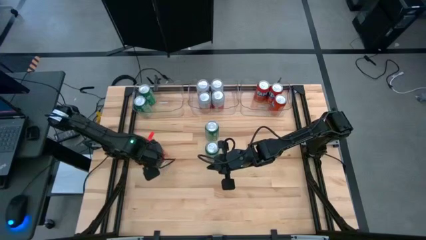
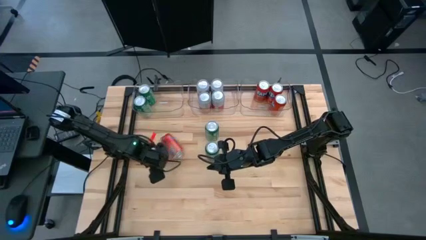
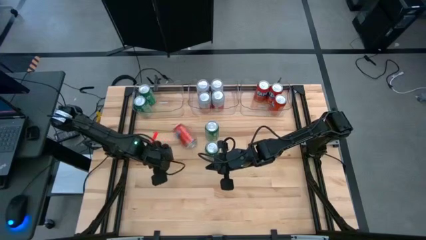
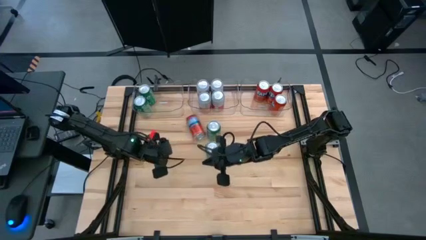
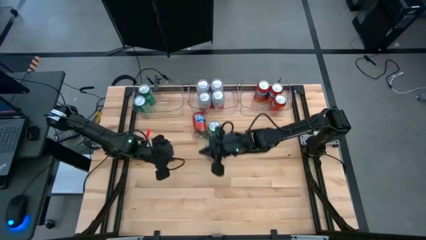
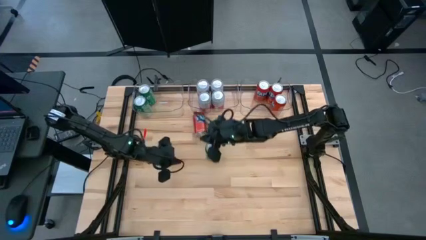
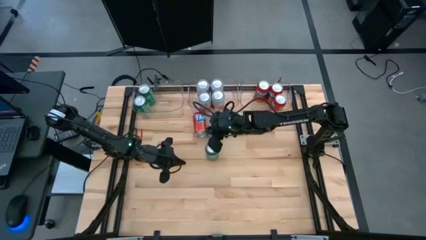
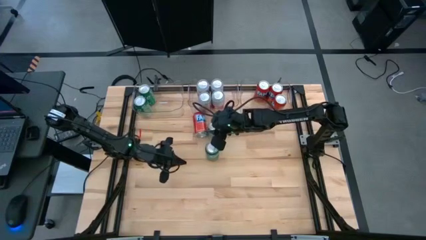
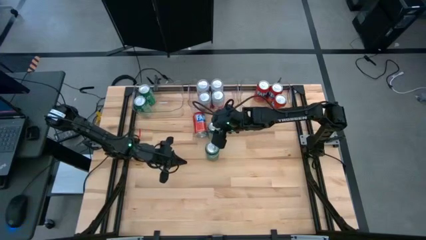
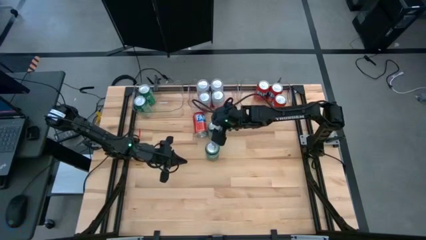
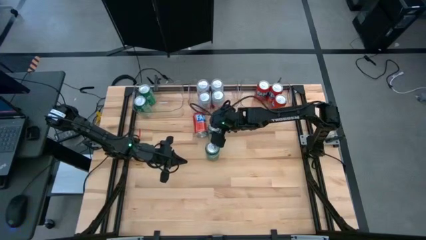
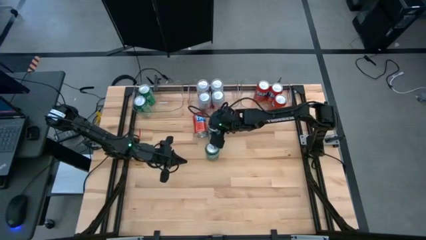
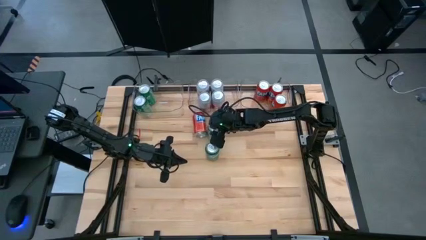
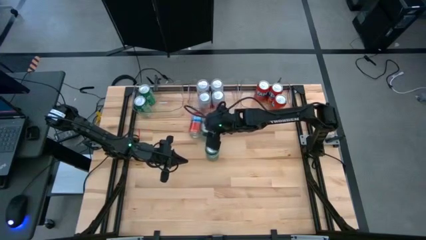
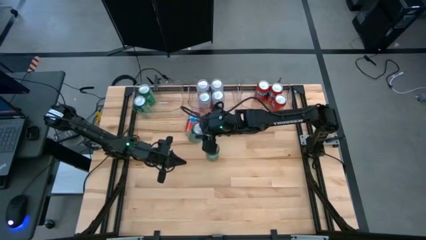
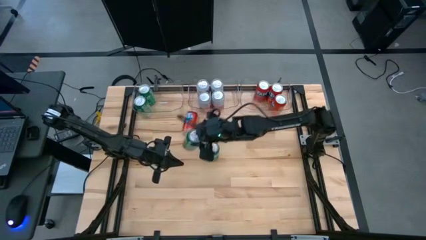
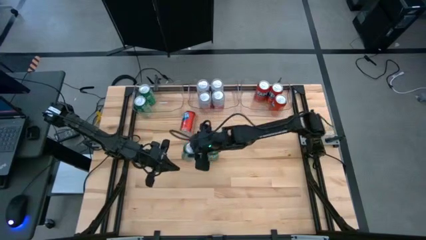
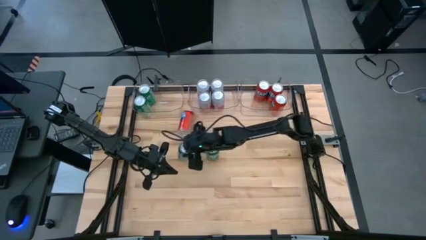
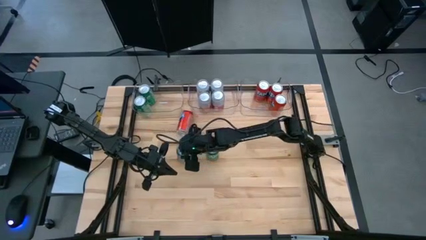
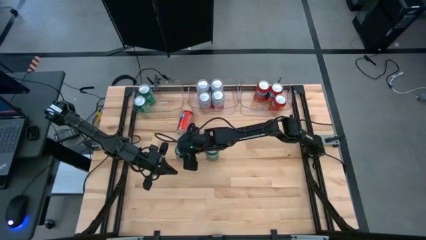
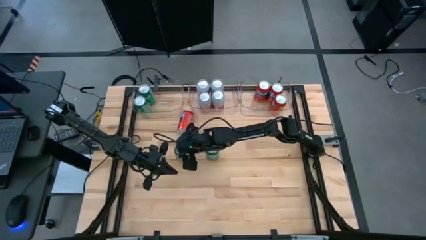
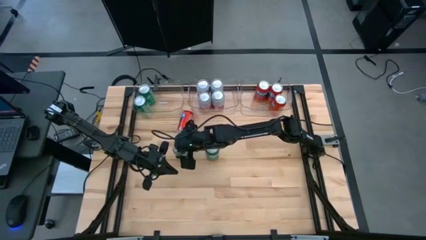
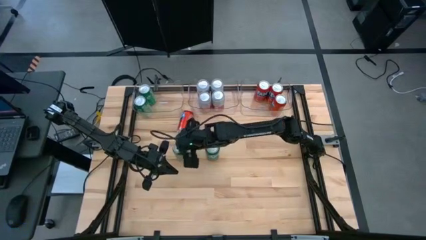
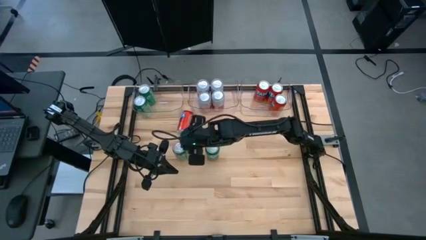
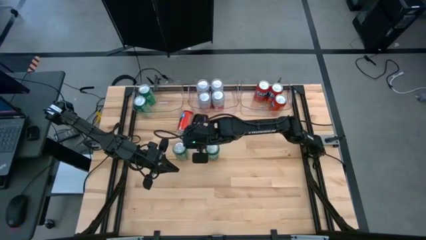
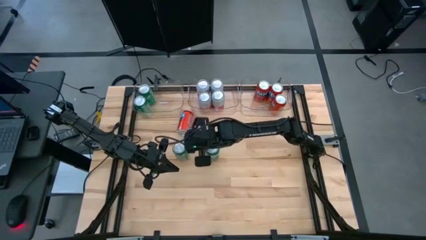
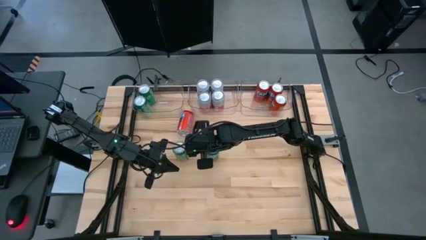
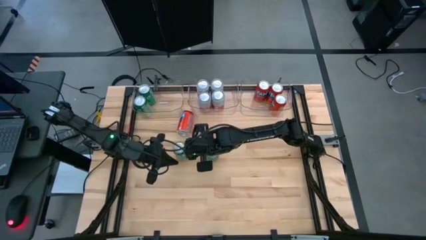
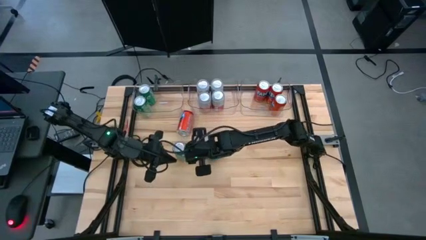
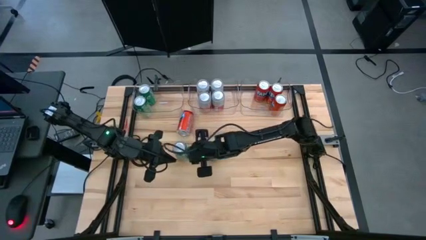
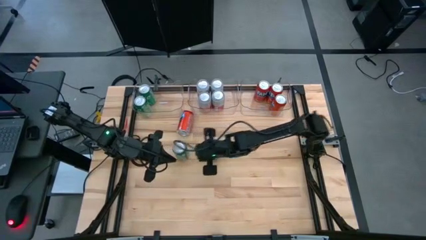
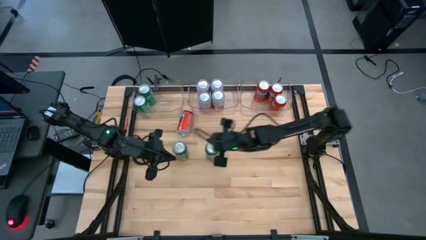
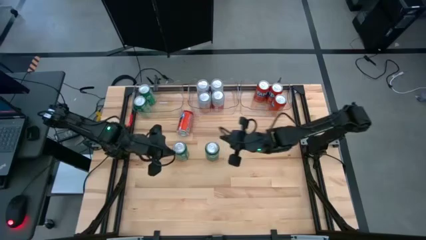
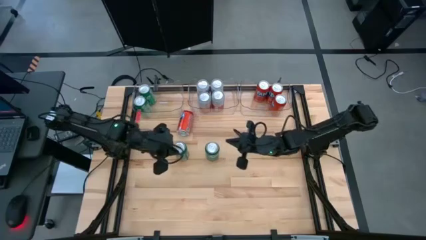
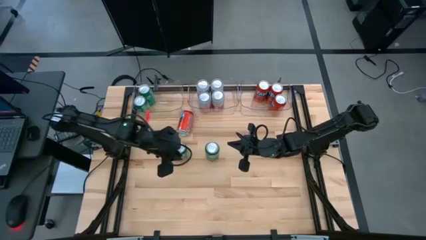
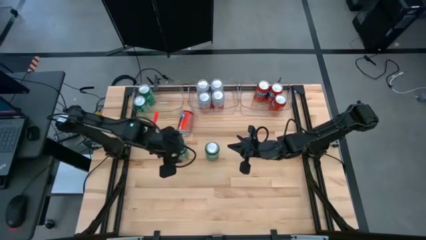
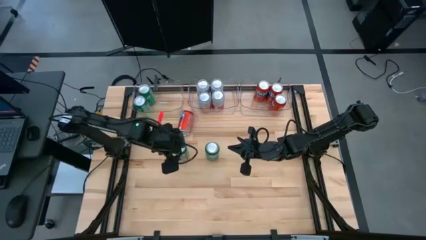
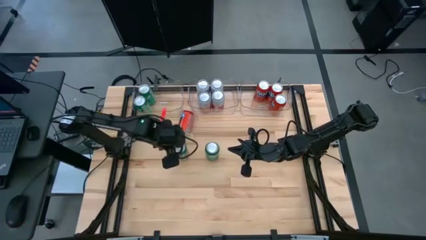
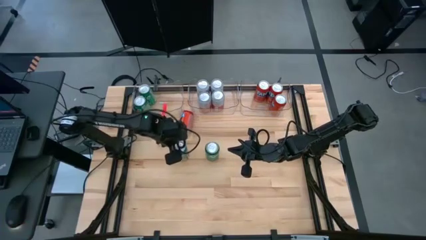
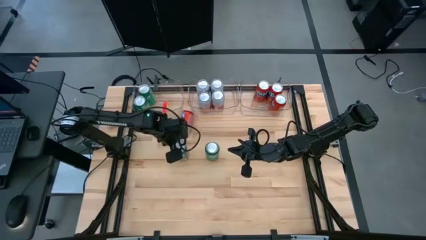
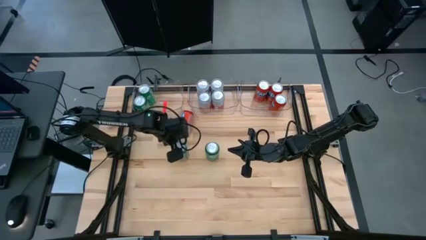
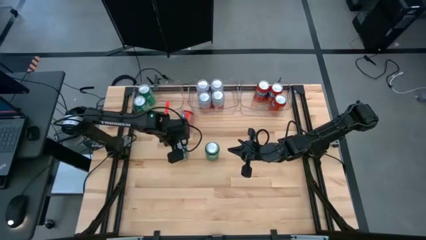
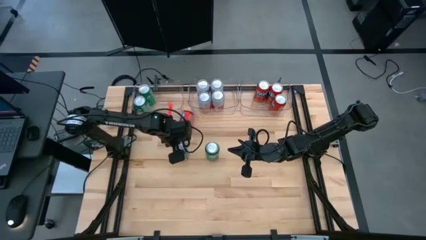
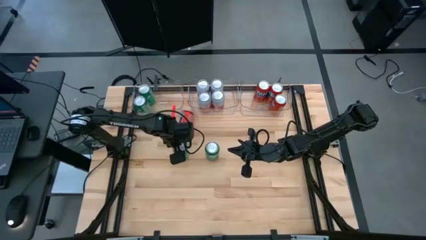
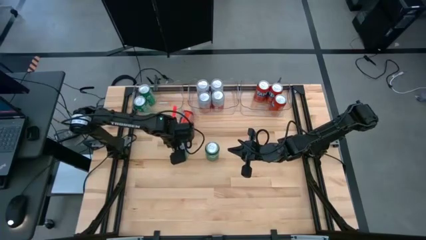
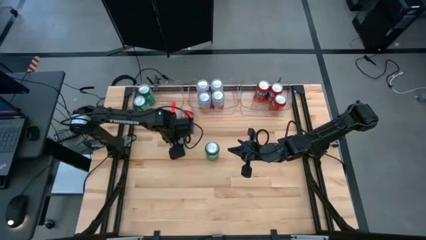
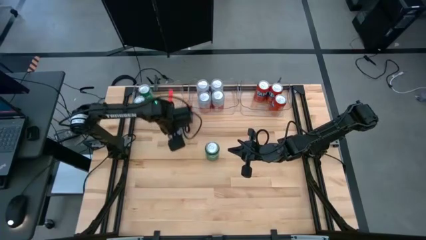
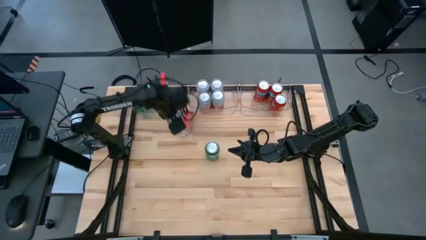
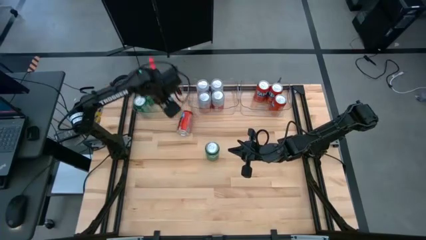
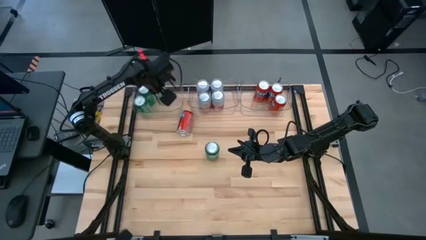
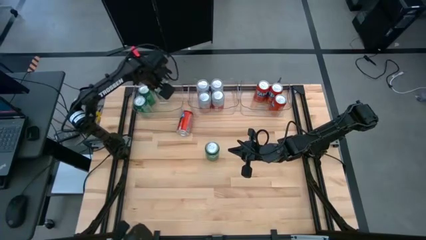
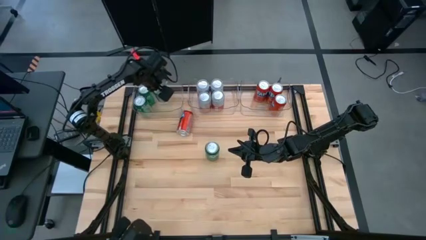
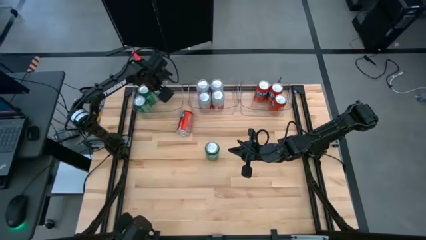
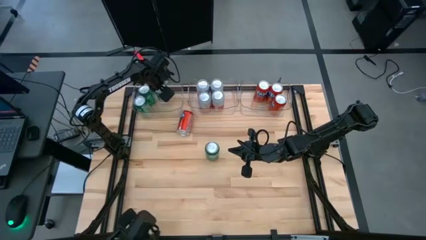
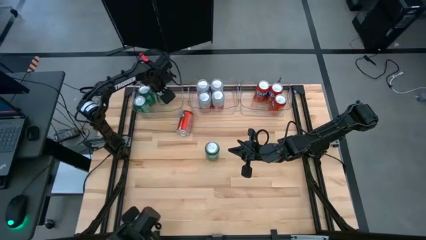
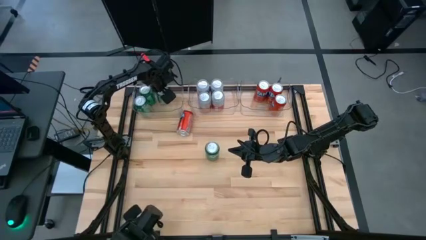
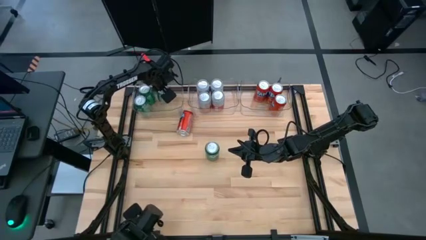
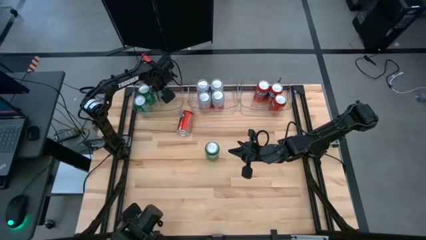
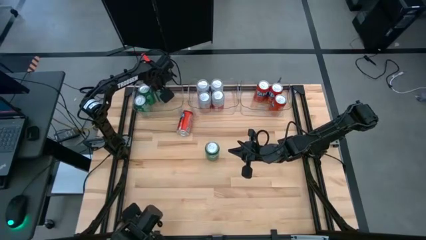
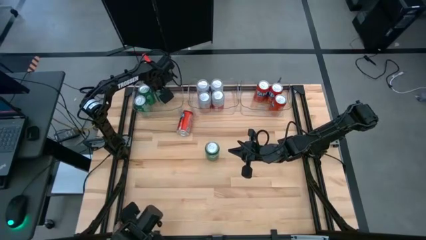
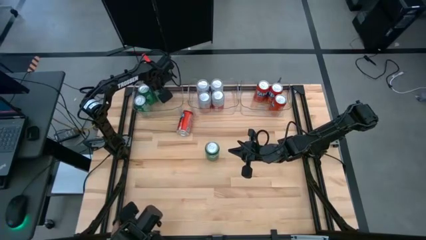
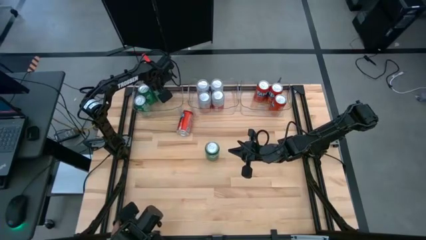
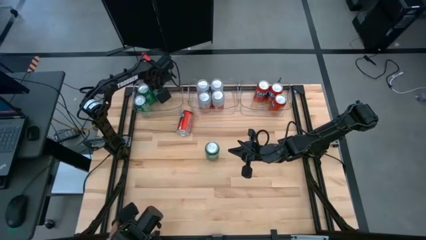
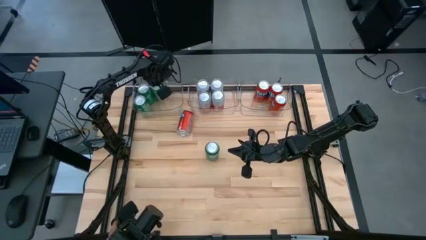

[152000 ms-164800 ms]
Task: Sort soda cans
Put the green soda can into the top left transparent bin

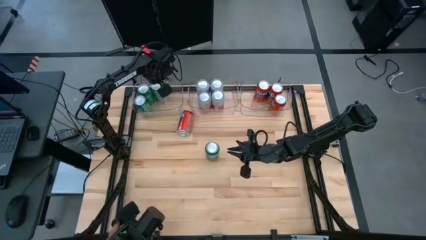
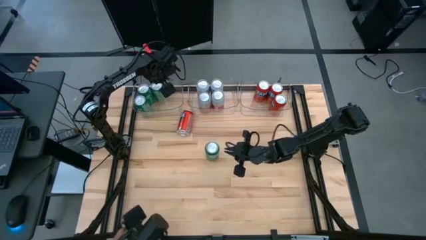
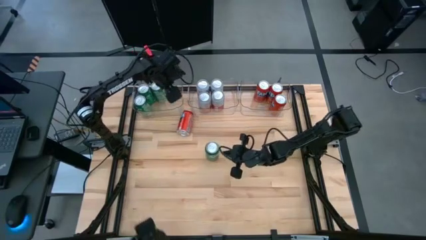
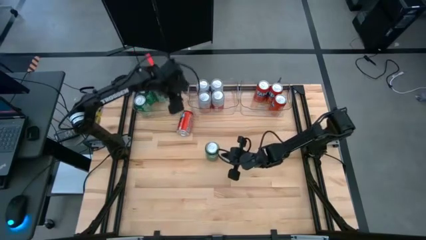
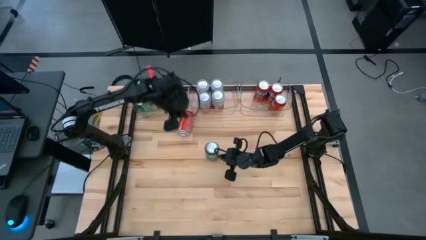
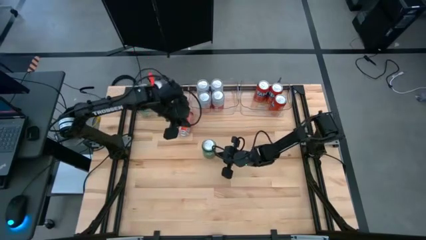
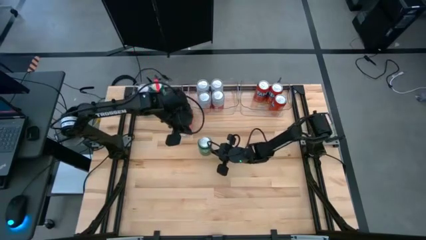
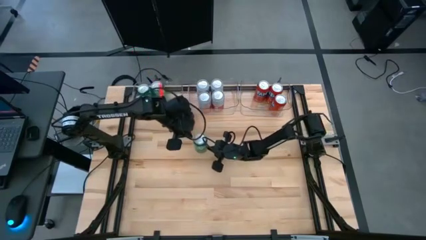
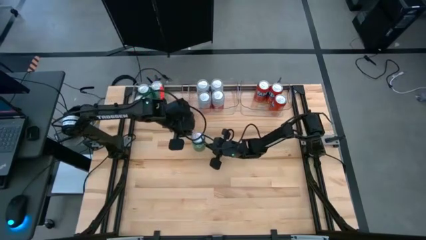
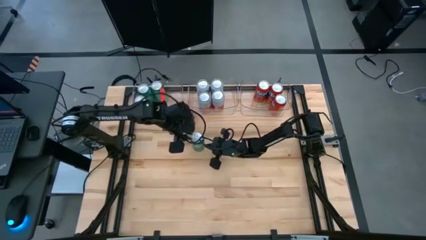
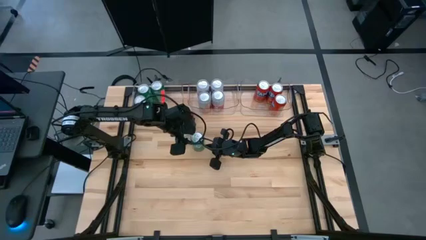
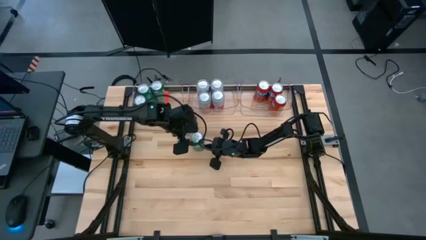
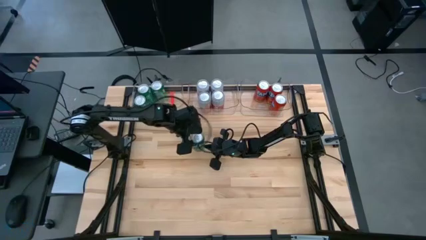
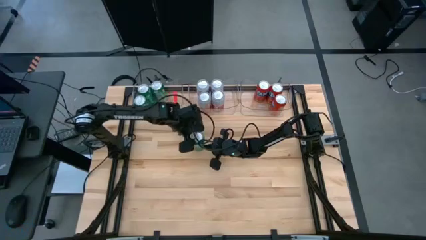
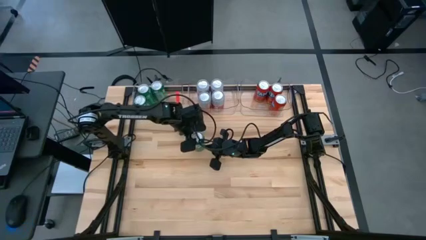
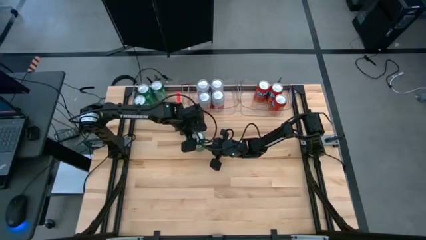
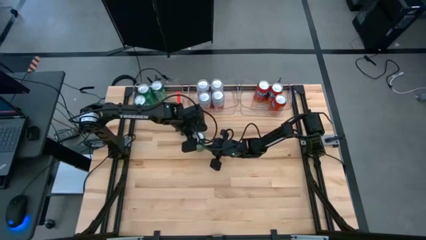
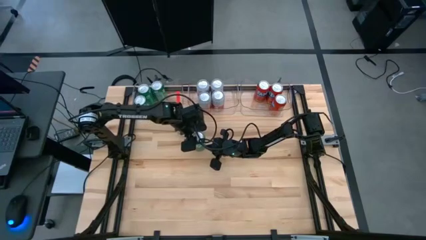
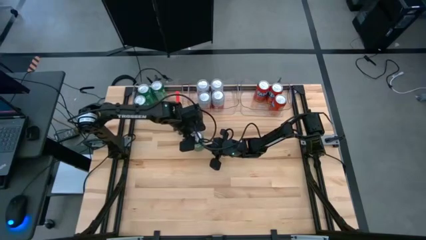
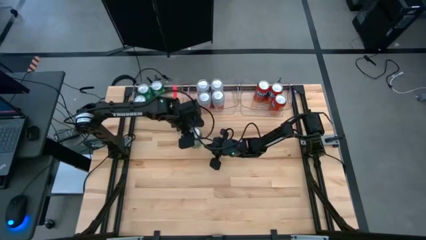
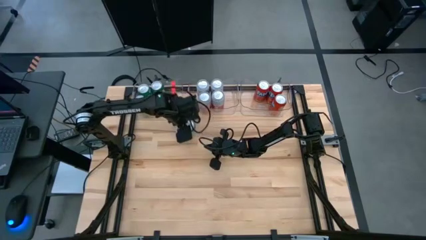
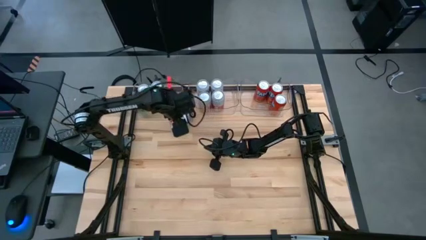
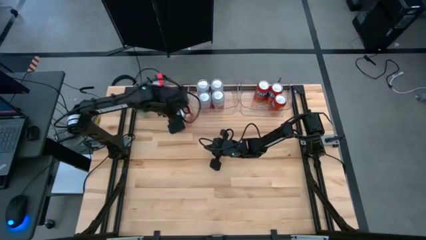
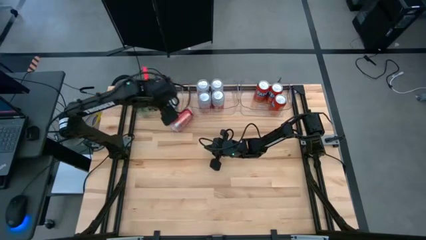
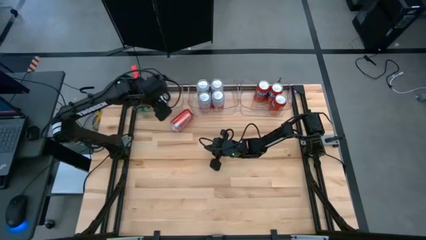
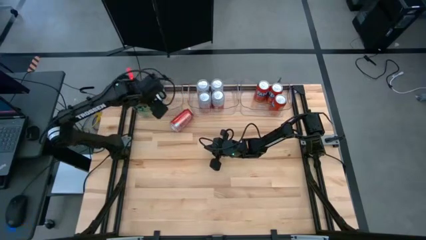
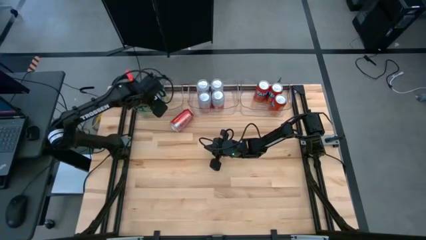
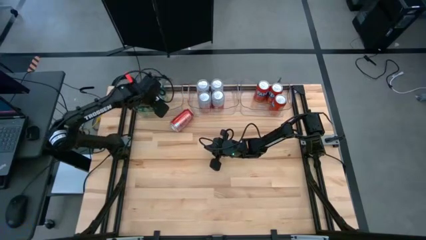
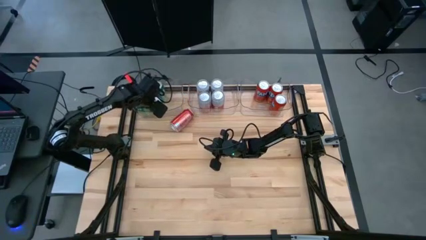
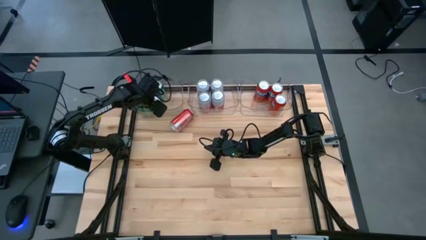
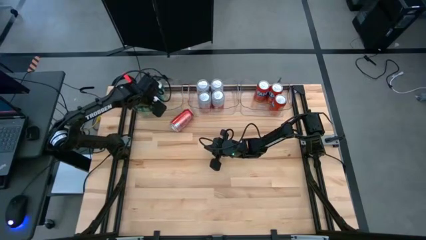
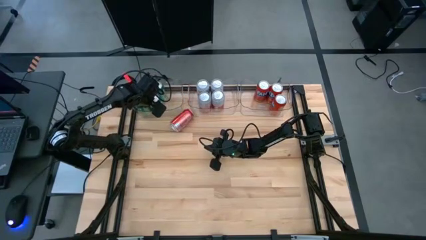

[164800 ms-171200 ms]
Put the green soda can into the top left transparent bin
